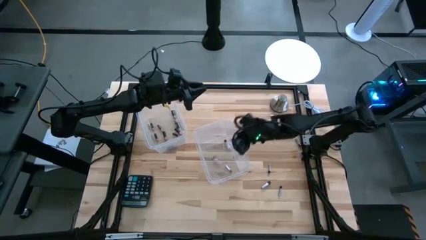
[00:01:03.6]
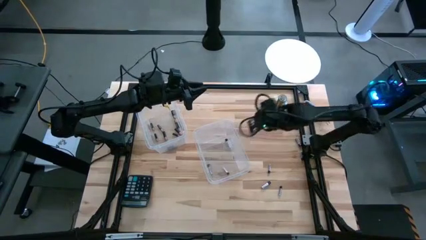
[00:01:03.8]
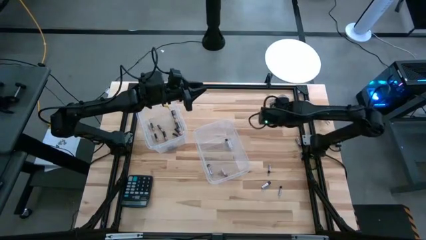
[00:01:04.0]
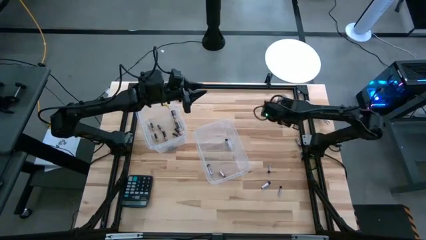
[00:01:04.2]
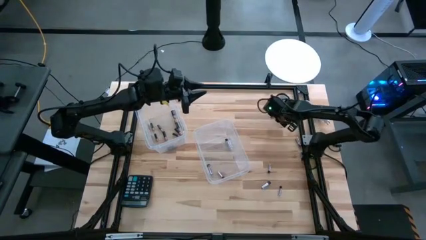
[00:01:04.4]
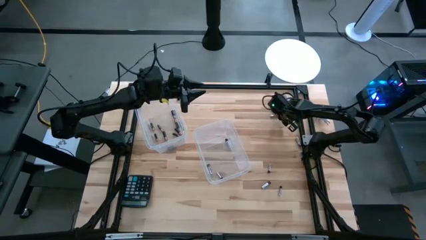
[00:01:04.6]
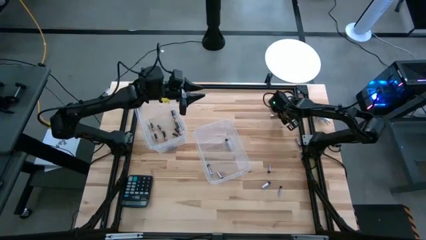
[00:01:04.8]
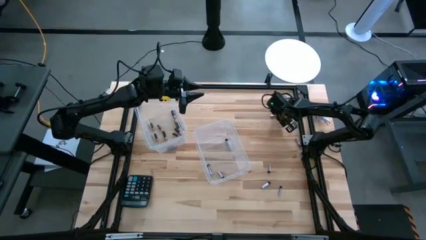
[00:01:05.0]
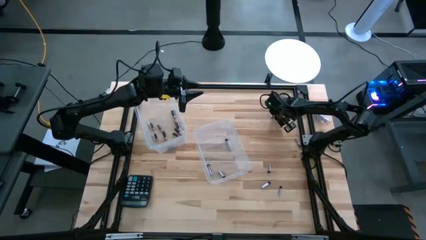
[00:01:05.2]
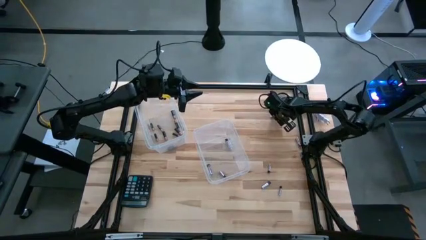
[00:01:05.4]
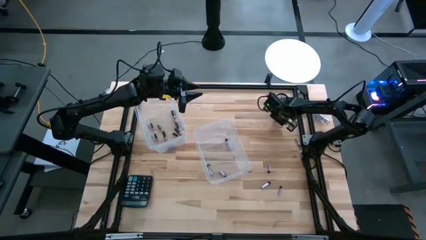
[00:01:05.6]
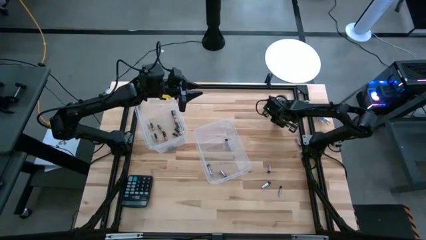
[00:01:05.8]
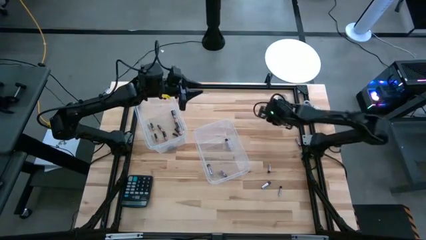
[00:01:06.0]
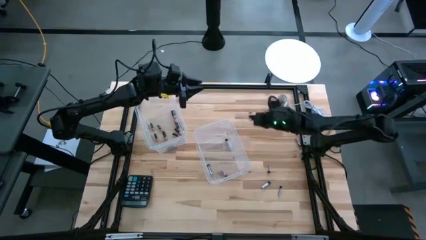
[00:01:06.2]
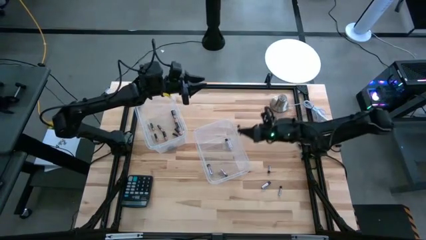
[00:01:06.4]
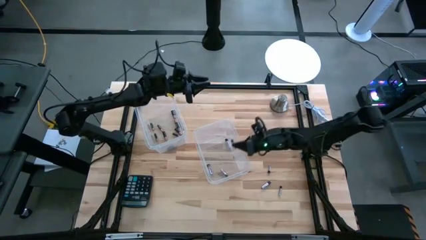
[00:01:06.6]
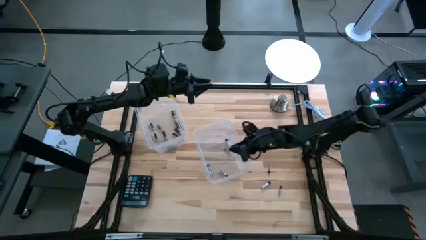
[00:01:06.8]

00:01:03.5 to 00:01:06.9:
Task: Sort batteries
Put the silver battery into the right transparent bin

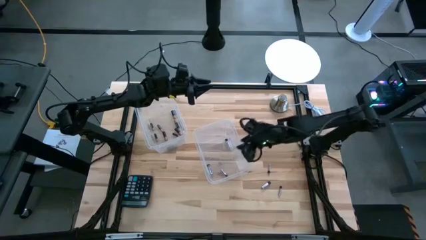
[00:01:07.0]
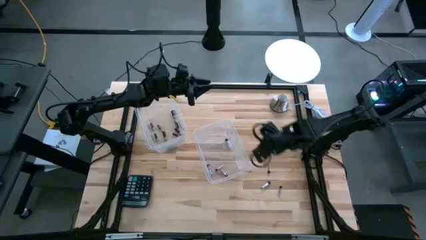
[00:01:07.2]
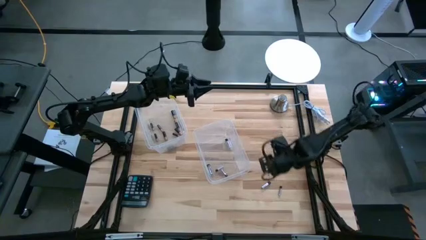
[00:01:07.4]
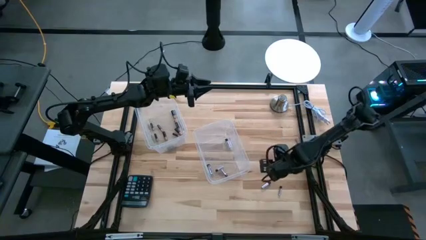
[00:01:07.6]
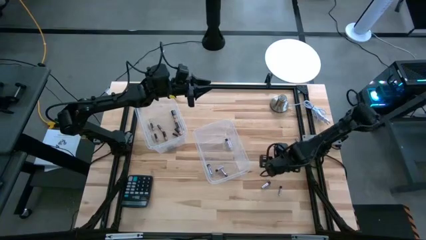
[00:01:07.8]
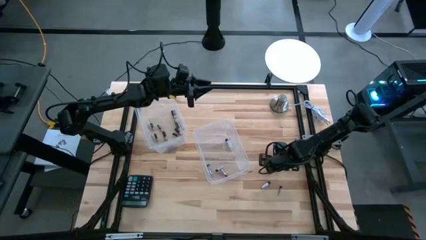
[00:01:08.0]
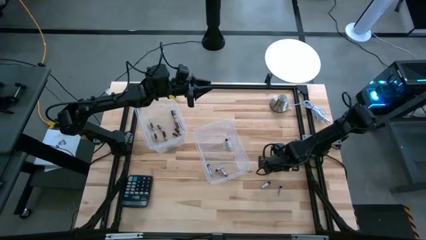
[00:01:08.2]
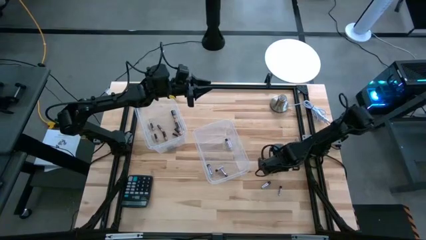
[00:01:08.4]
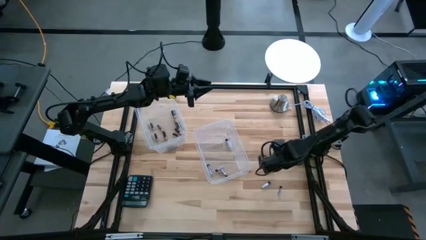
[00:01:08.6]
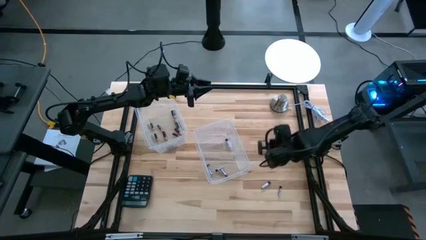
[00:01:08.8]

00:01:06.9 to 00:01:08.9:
Put the silver battery into the right transparent bin

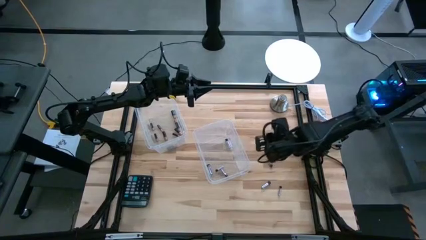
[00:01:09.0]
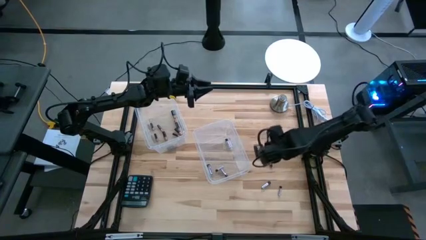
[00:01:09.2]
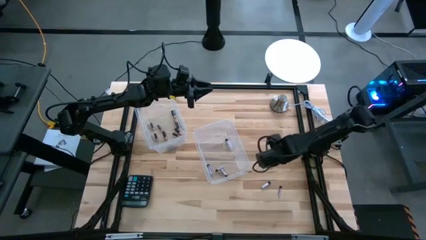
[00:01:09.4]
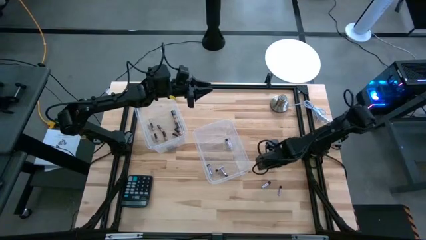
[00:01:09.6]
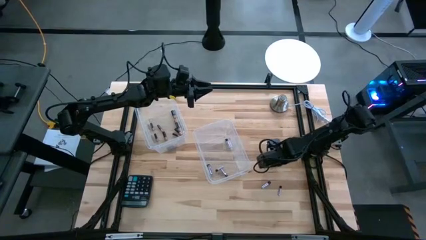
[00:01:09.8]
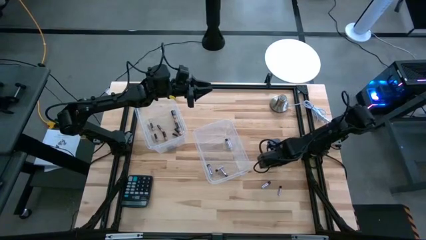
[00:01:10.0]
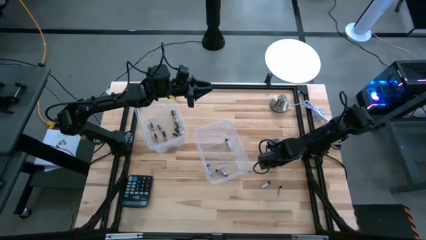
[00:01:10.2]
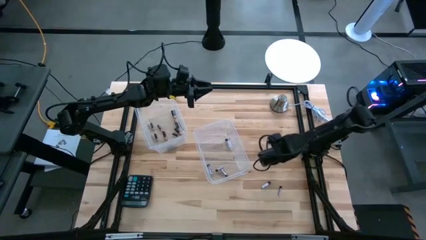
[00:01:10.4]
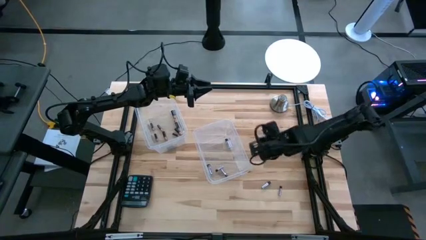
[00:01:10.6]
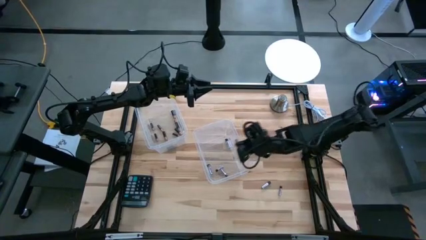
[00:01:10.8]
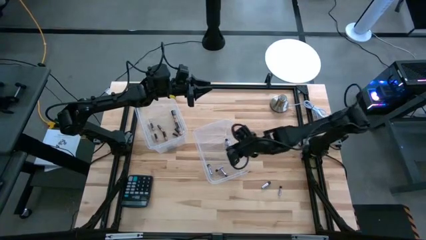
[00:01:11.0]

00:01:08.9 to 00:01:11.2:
Put the silver battery into the right transparent bin

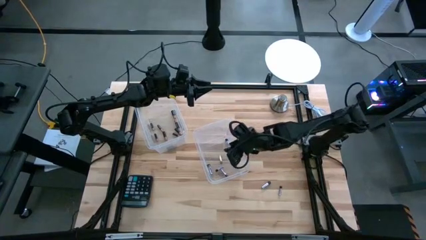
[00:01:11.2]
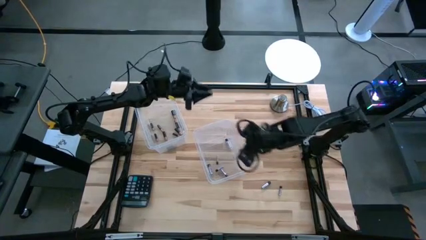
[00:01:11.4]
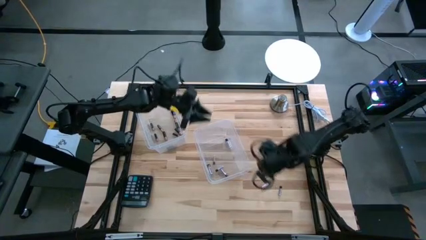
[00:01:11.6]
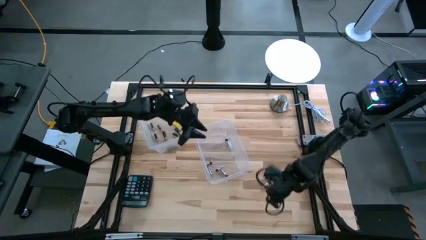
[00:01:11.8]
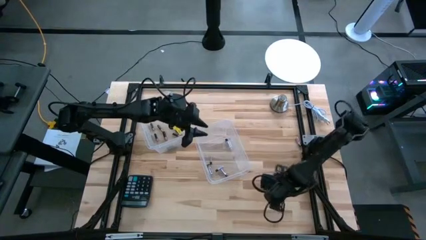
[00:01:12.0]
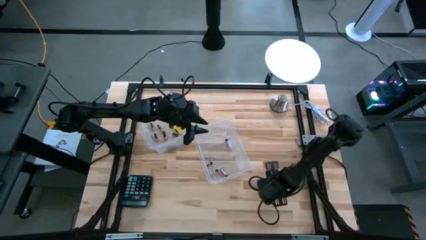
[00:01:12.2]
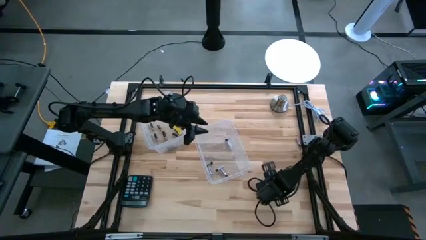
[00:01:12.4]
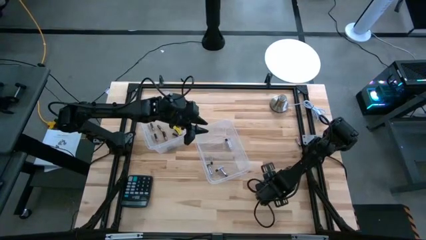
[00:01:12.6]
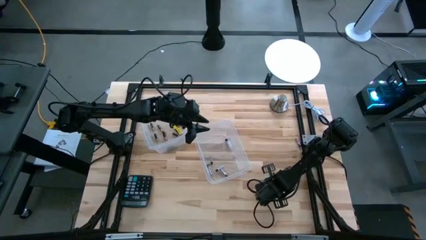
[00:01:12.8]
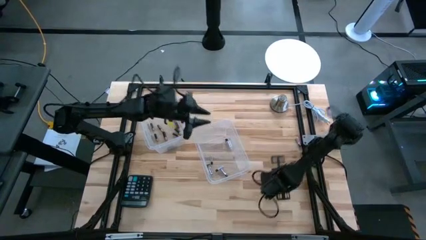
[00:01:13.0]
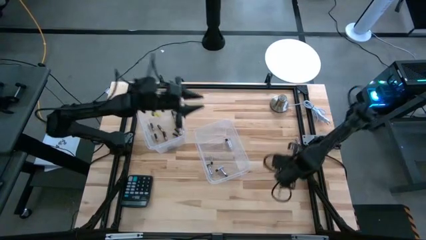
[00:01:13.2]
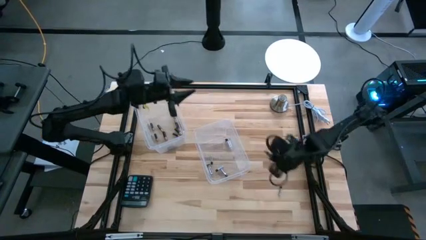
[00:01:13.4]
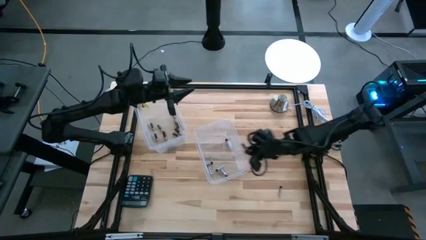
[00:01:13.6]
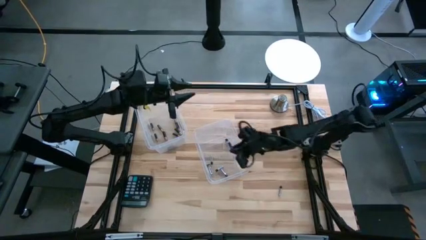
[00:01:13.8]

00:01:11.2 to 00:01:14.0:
Put the silver battery into the right transparent bin

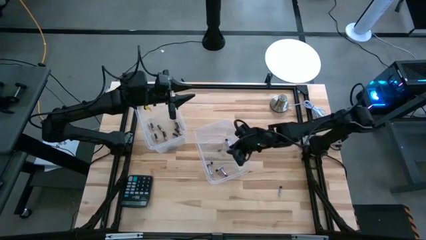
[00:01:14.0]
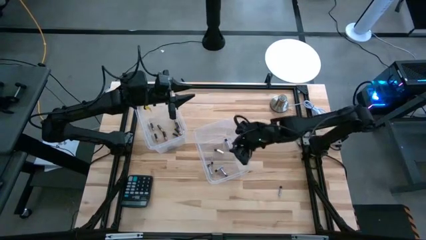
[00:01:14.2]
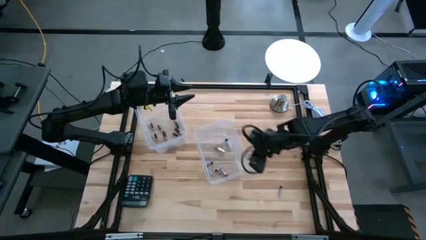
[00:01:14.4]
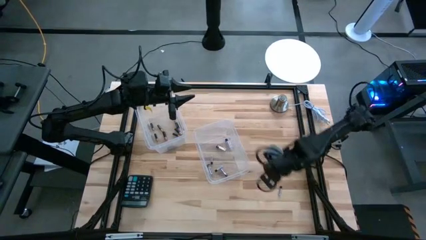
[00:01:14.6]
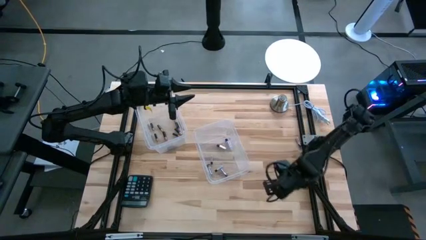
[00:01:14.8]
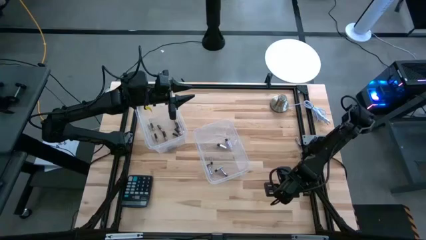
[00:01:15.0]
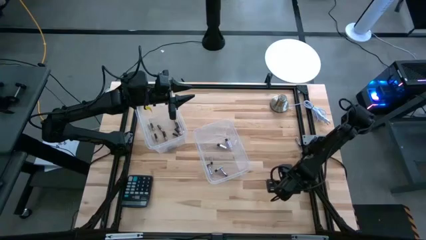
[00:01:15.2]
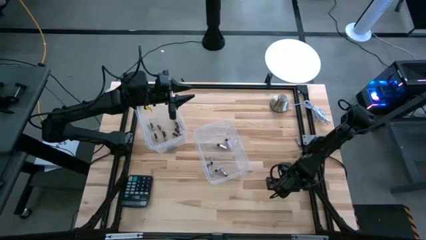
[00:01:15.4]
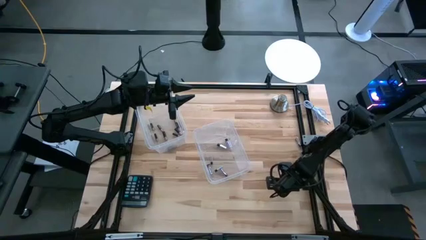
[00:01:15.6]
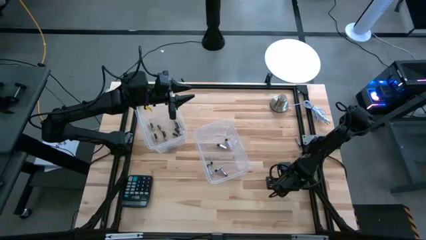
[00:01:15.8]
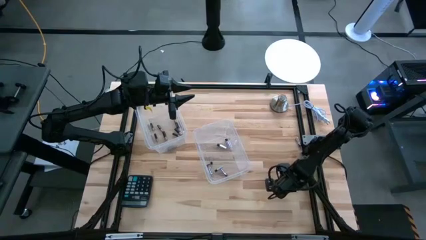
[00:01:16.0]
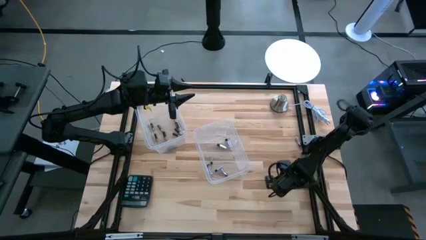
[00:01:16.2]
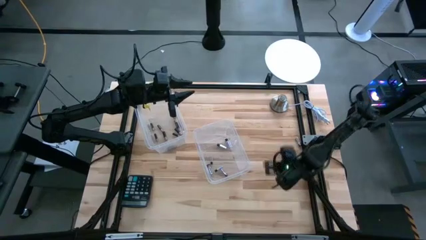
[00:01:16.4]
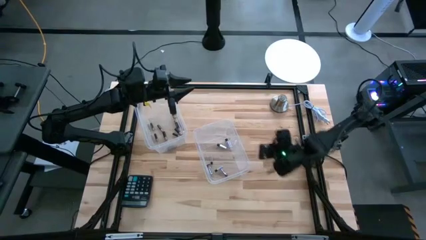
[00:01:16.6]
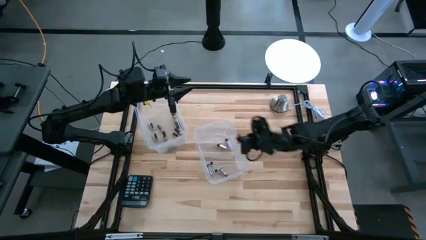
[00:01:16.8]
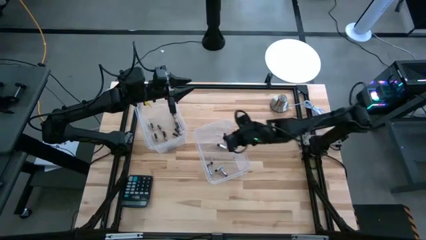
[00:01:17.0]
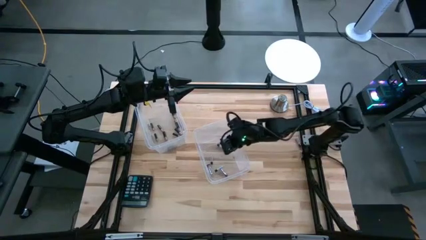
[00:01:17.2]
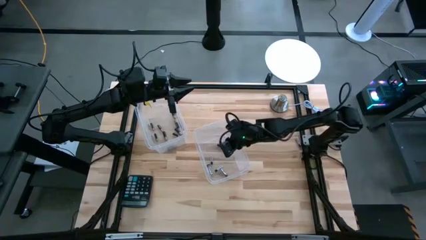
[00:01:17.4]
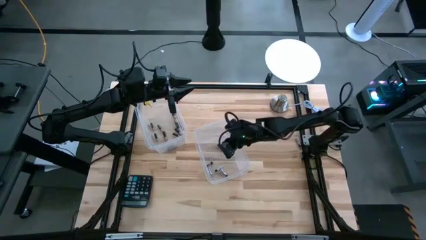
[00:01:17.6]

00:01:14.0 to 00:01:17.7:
Put the silver battery into the right transparent bin
